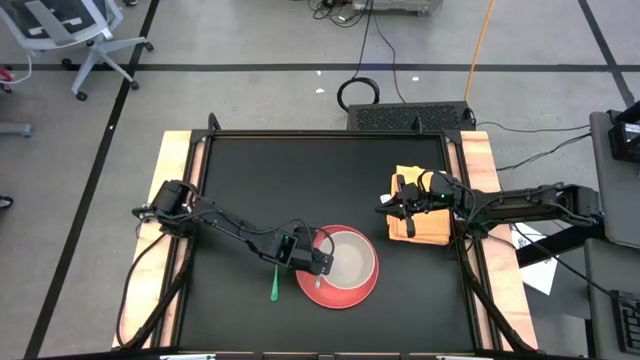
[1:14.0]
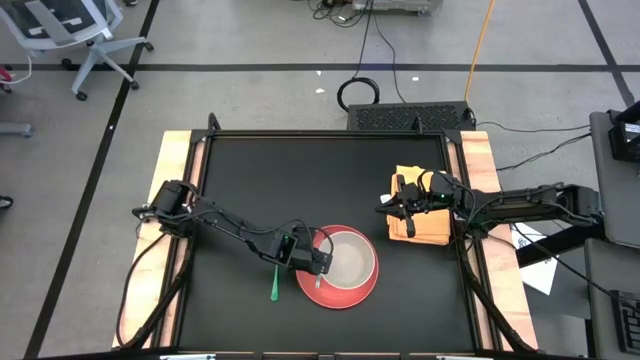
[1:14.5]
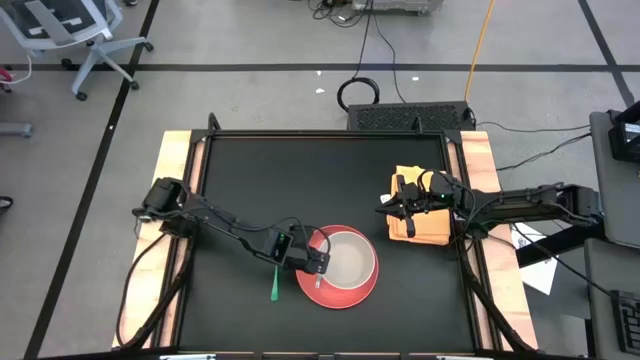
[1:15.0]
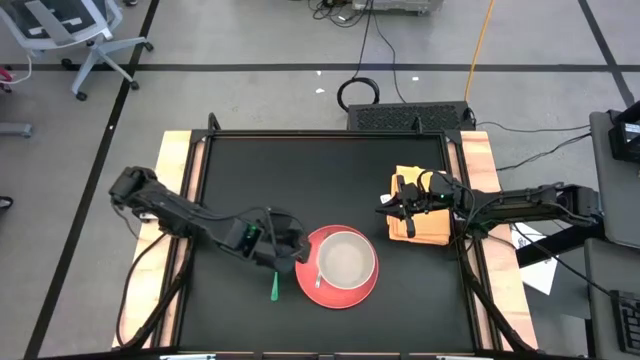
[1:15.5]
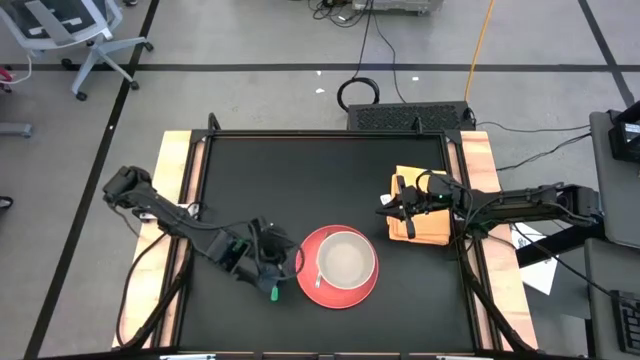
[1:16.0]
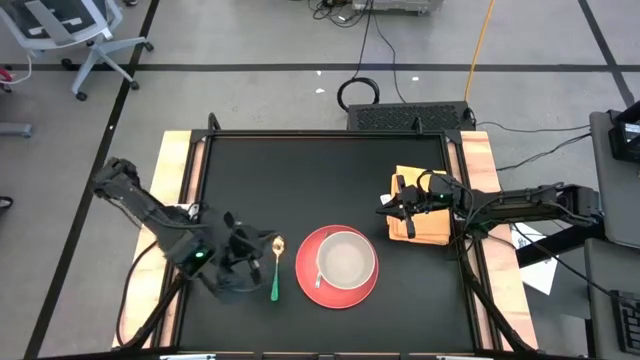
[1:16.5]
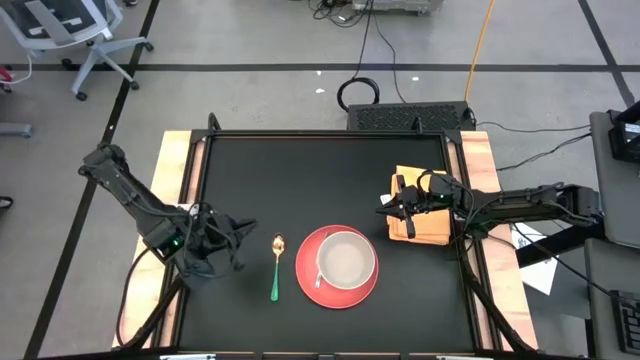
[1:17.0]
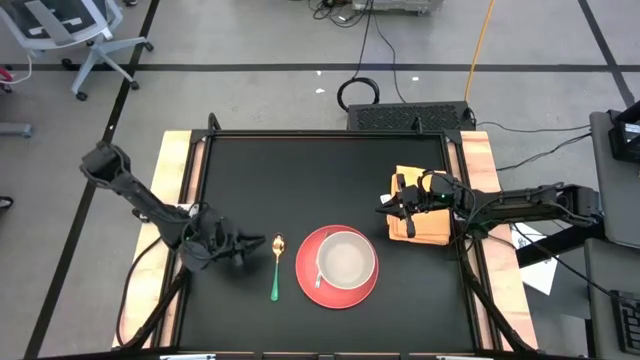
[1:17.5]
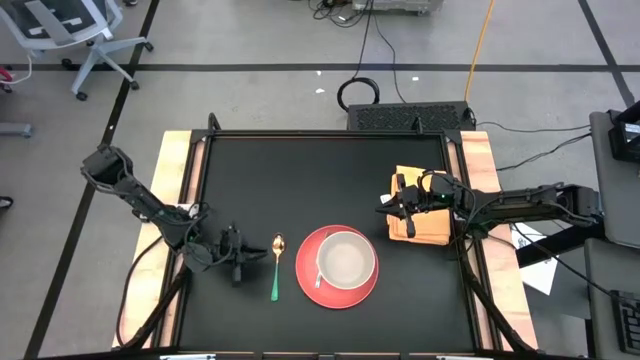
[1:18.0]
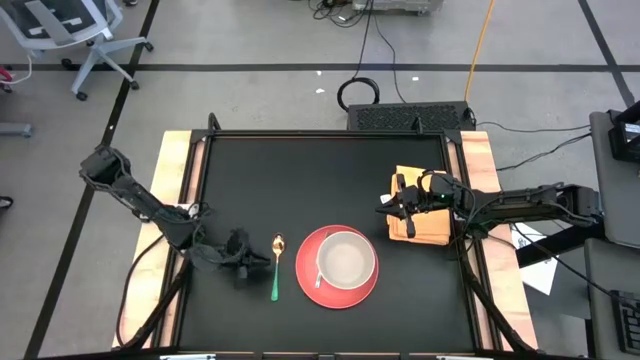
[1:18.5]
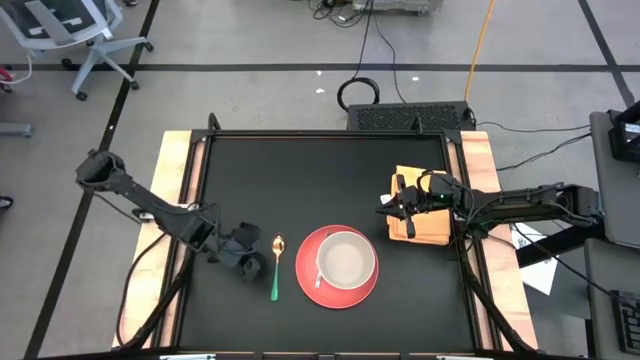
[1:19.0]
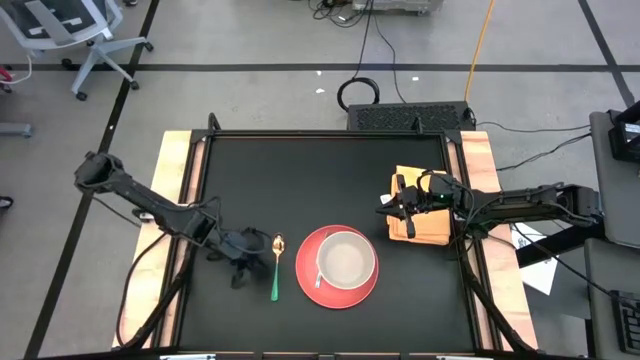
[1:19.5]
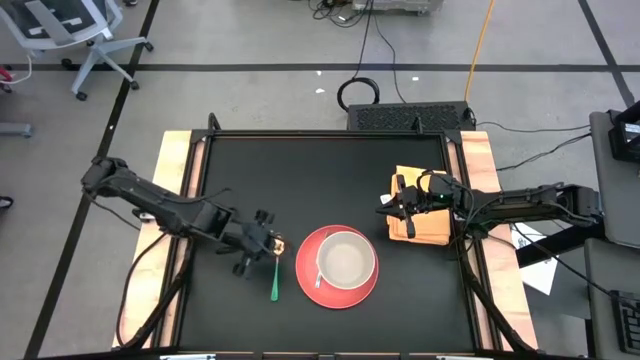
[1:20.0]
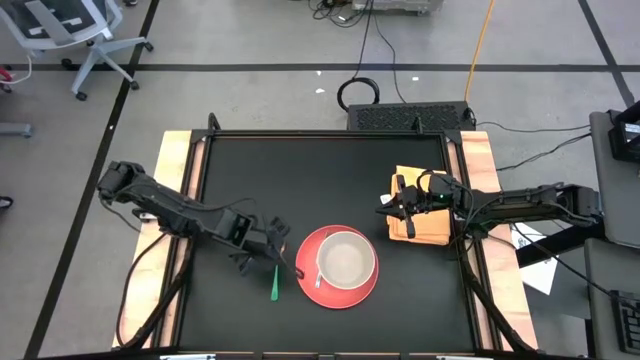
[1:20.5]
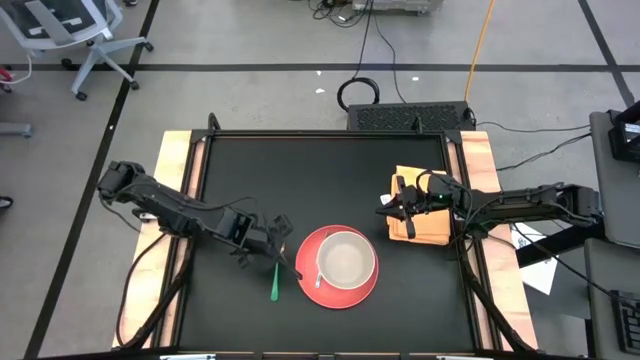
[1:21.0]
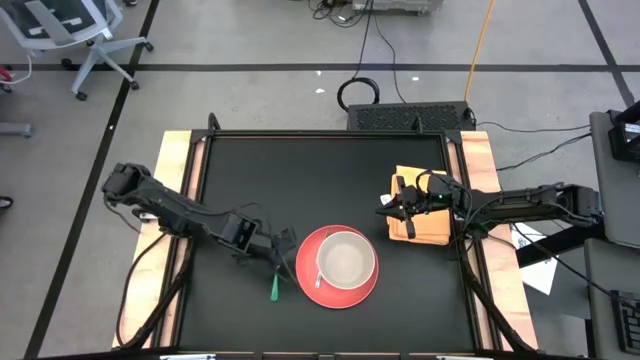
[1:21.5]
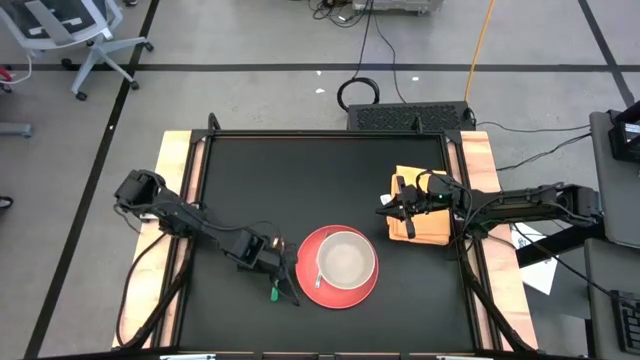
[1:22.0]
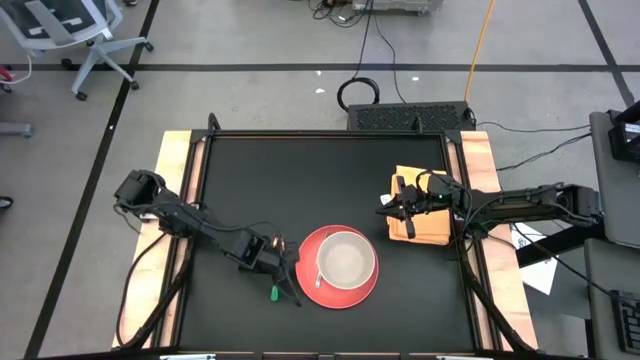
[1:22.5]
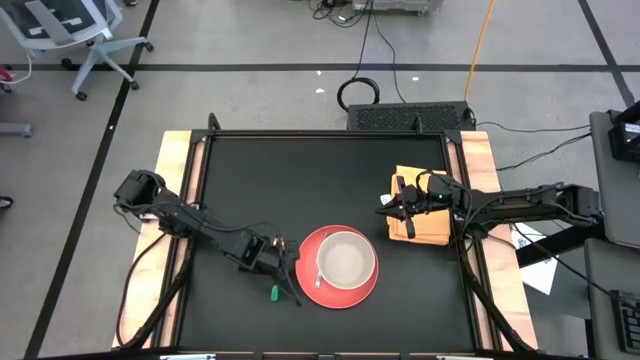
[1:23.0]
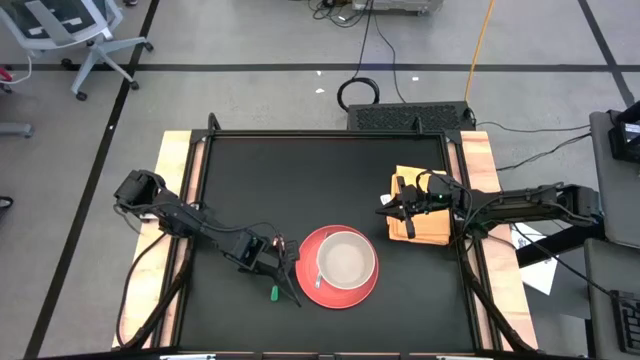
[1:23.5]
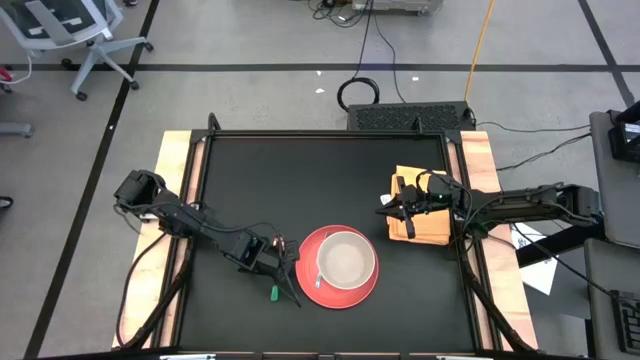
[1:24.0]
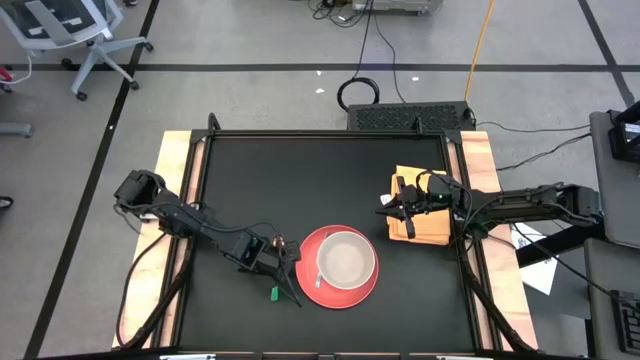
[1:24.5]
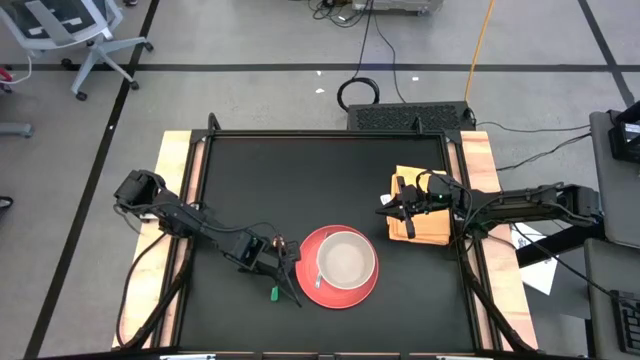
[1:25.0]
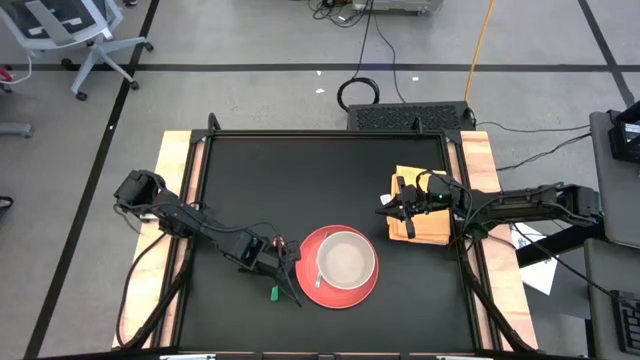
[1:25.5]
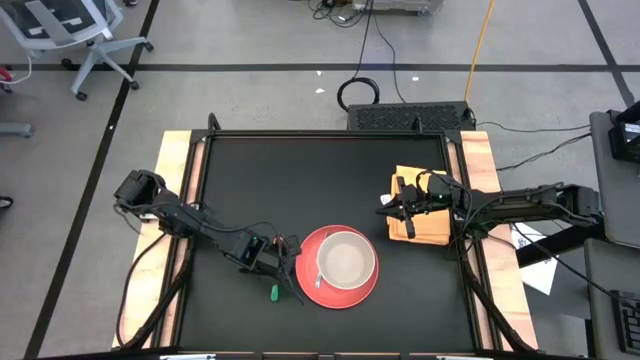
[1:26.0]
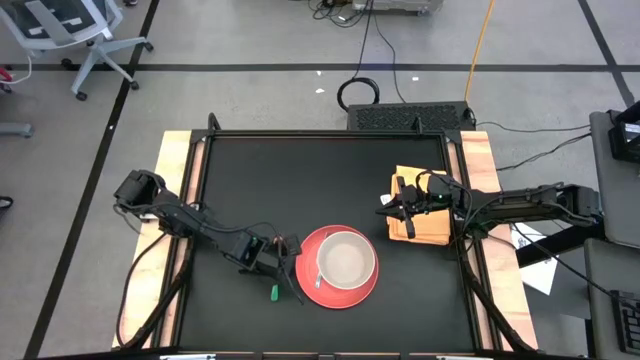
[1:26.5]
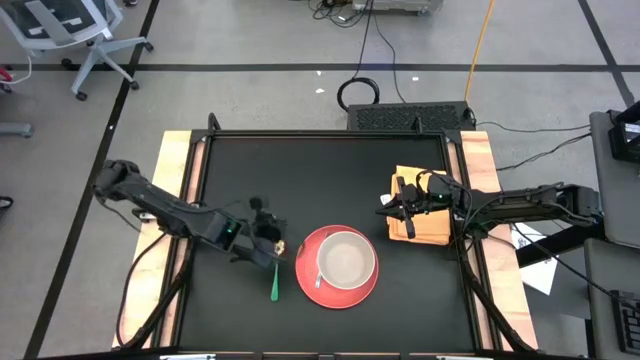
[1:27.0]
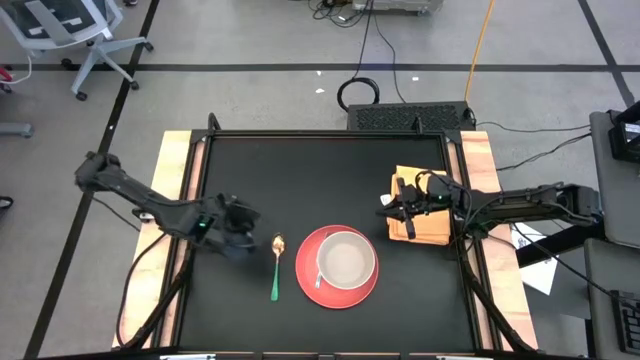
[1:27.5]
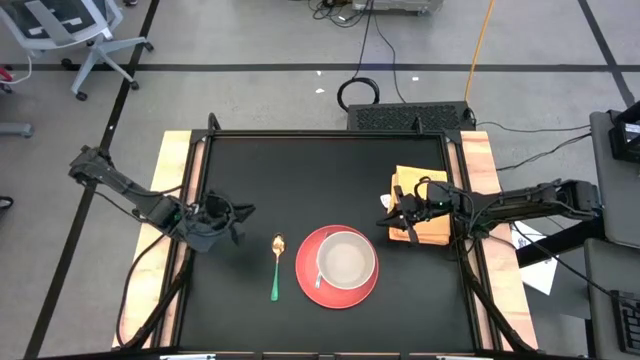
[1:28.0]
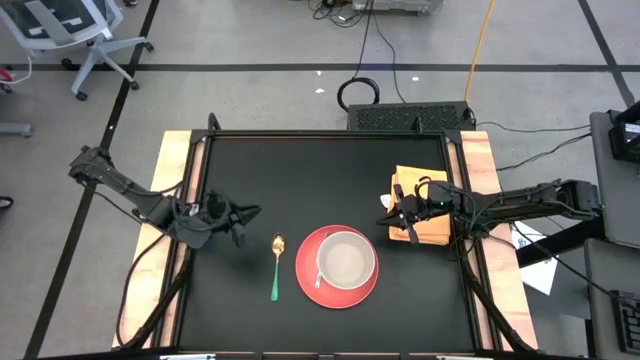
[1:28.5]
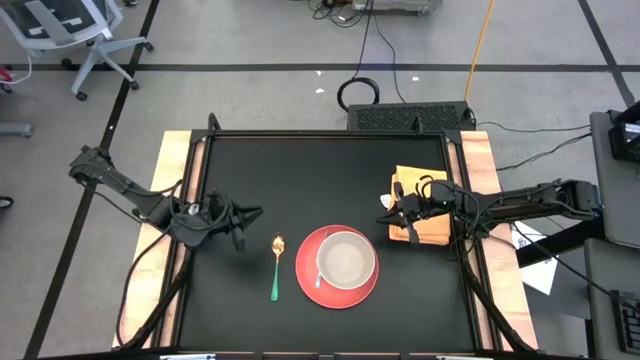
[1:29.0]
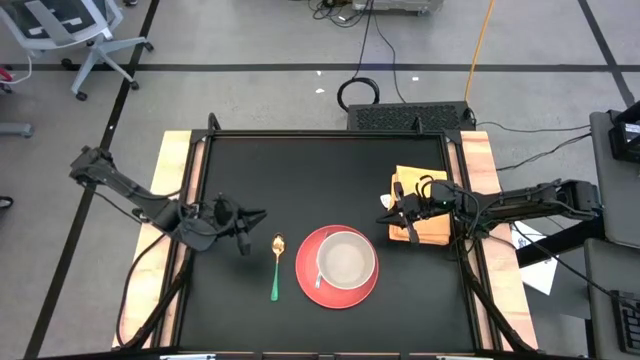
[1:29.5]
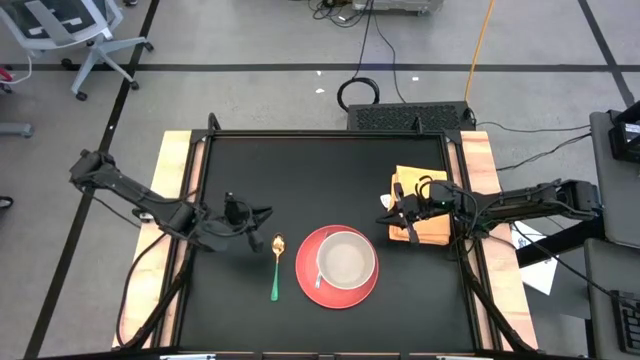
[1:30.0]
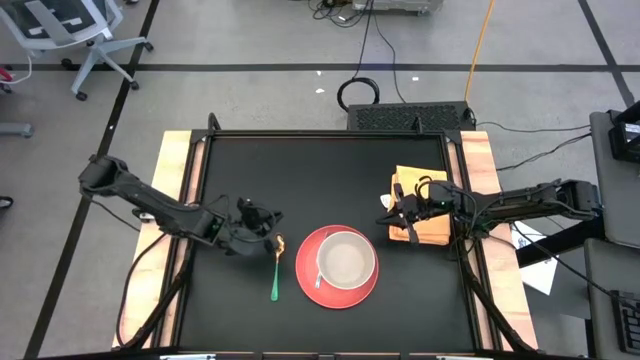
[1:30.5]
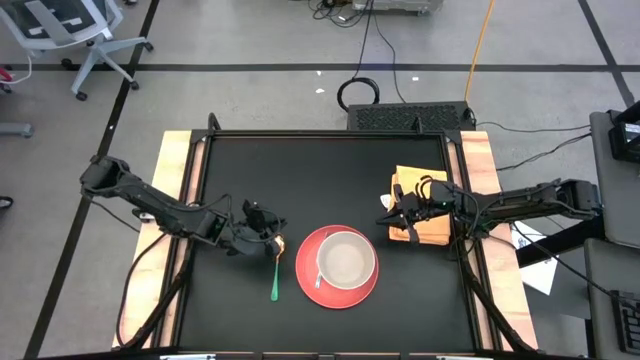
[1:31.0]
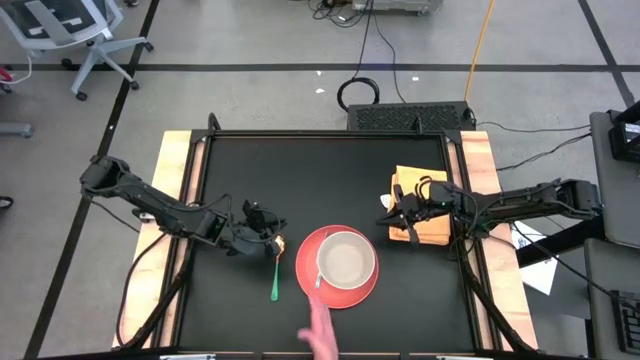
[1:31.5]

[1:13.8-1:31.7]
Task: Set table place
Put the green spoon into the white bowl

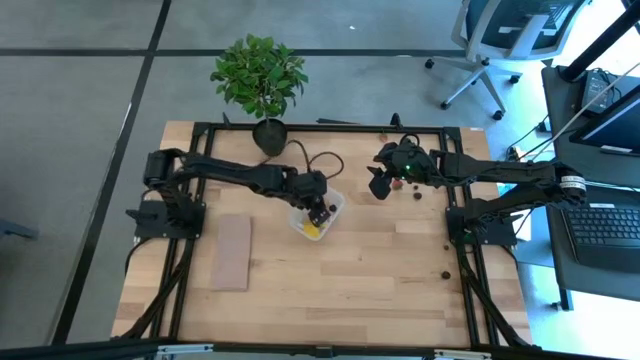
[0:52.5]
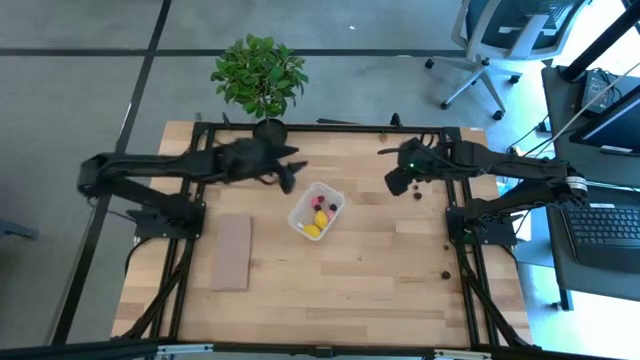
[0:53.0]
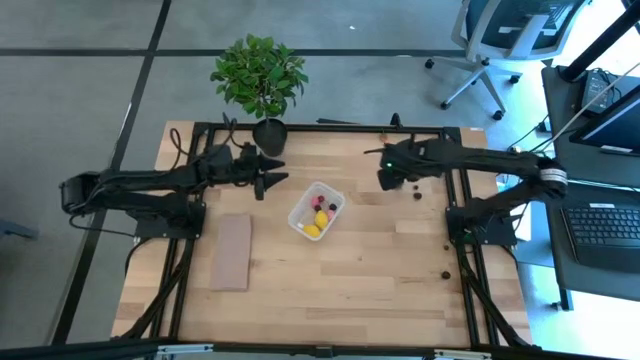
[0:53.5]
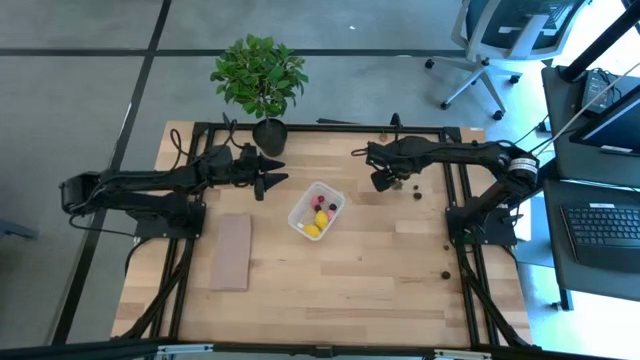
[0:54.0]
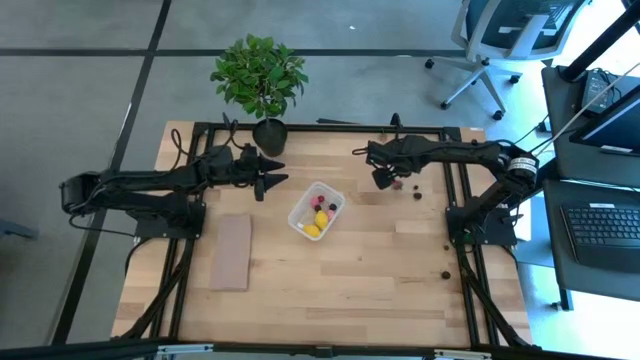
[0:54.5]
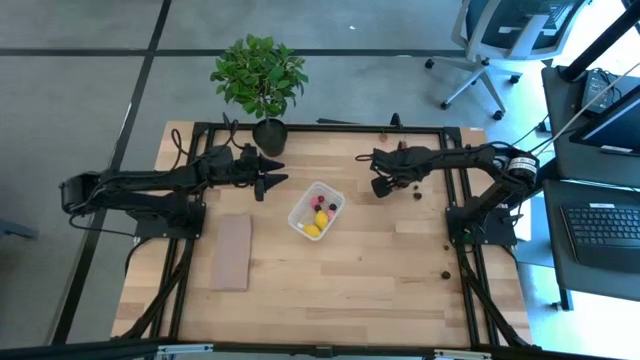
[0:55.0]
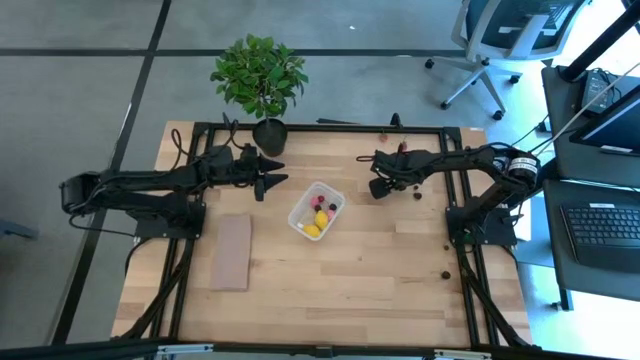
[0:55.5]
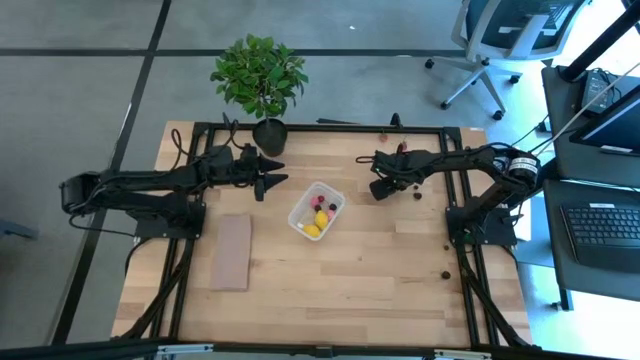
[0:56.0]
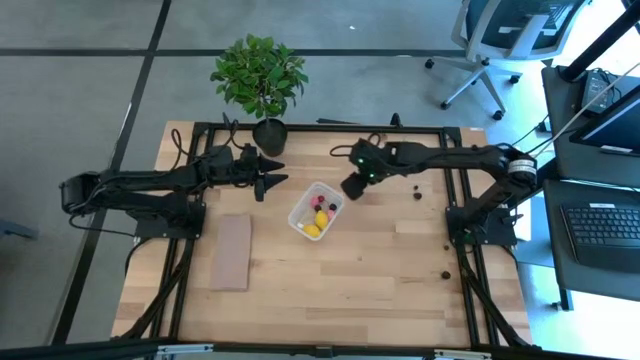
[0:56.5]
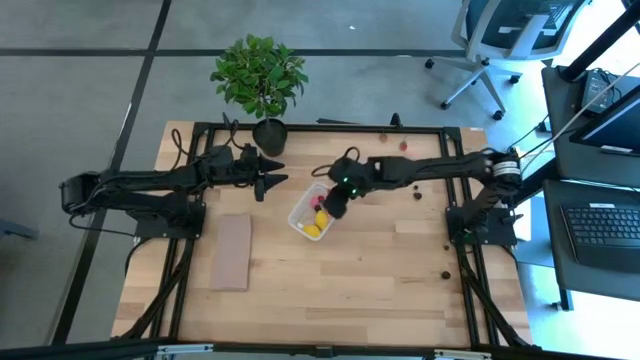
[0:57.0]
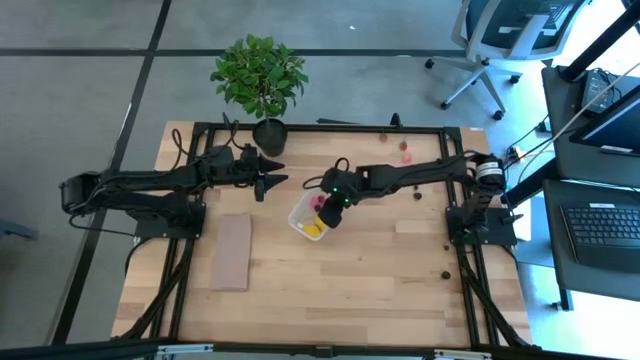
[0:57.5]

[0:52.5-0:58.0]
Task: Pick and placing Produce into tupperware
Put the bottom strawberry into the transparent bin
